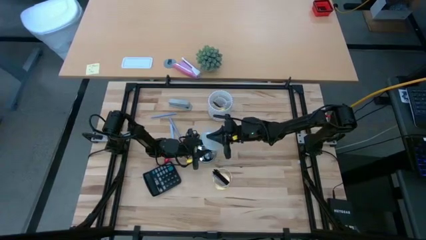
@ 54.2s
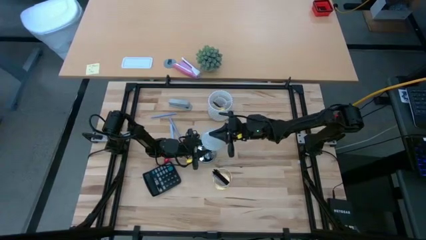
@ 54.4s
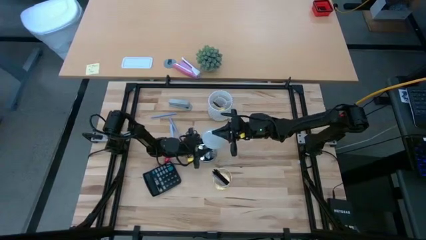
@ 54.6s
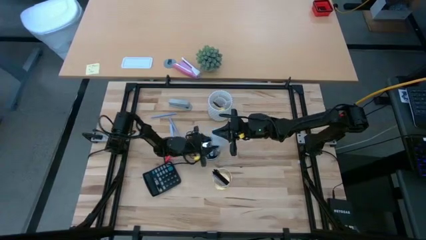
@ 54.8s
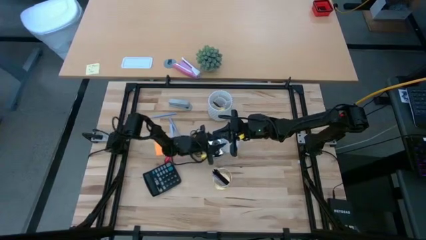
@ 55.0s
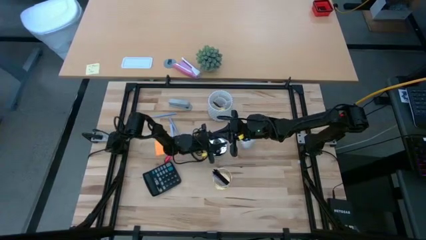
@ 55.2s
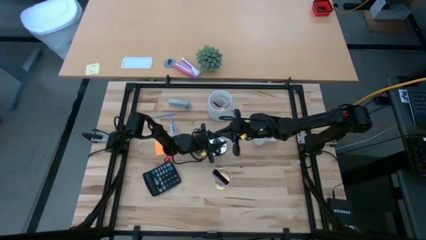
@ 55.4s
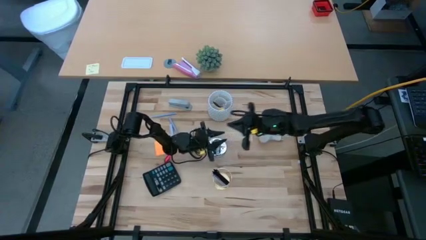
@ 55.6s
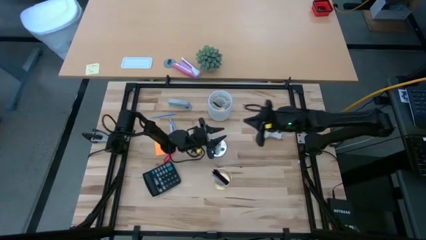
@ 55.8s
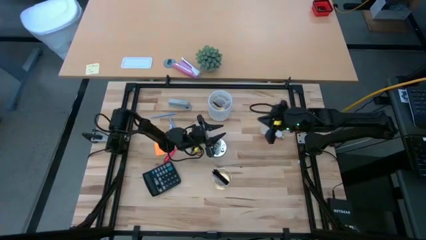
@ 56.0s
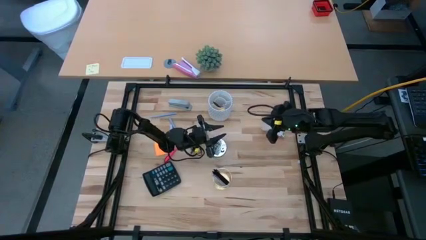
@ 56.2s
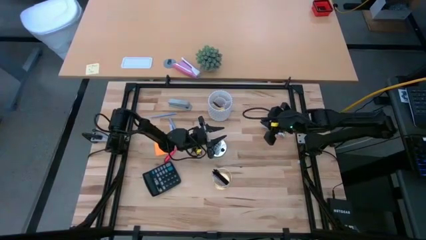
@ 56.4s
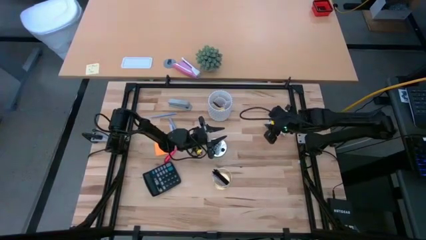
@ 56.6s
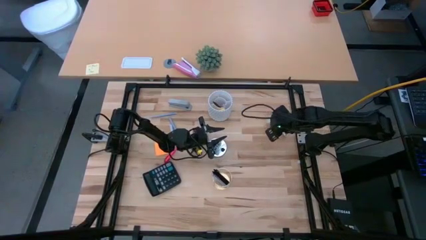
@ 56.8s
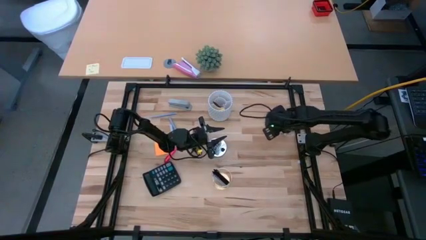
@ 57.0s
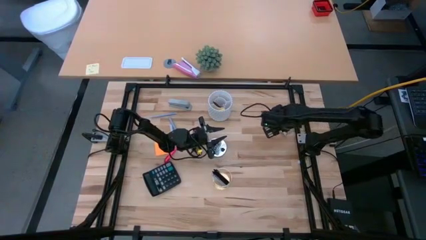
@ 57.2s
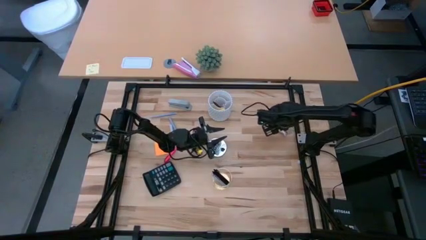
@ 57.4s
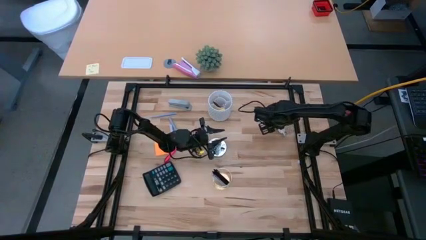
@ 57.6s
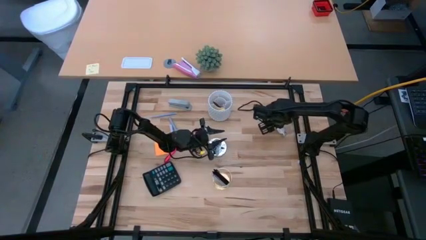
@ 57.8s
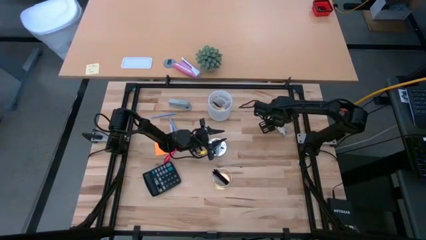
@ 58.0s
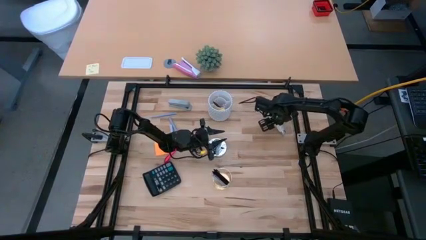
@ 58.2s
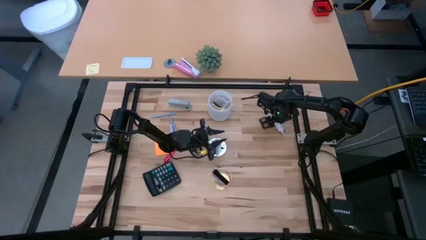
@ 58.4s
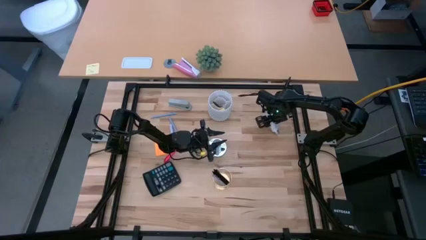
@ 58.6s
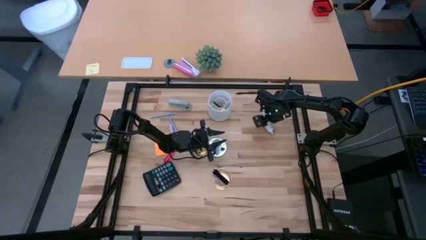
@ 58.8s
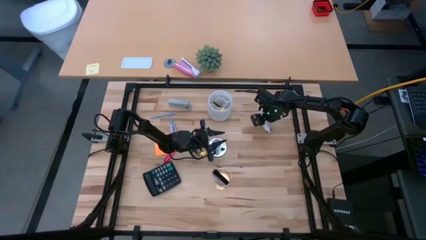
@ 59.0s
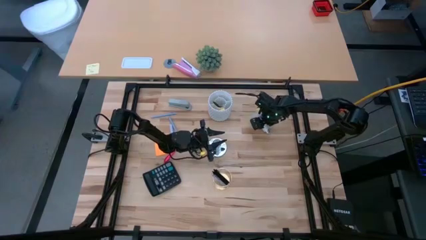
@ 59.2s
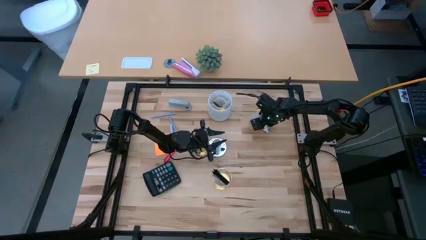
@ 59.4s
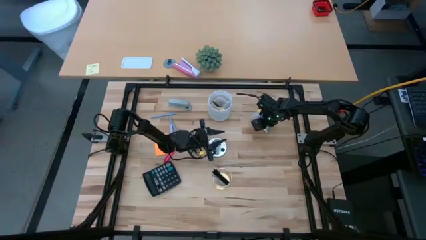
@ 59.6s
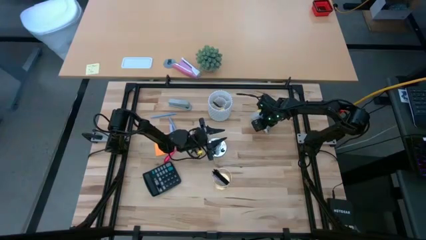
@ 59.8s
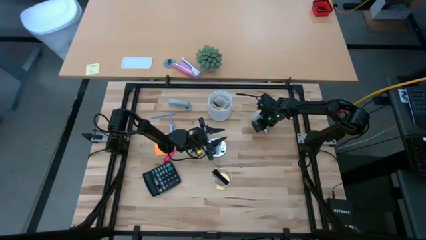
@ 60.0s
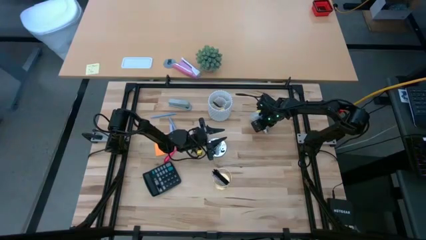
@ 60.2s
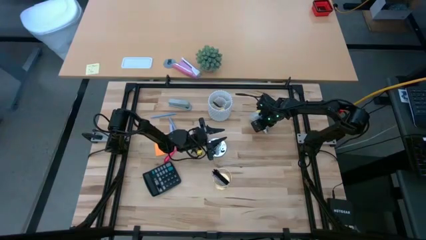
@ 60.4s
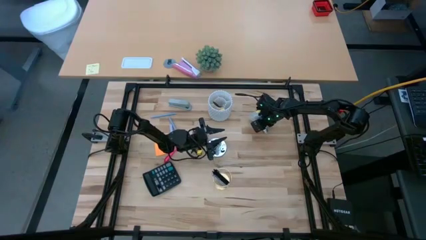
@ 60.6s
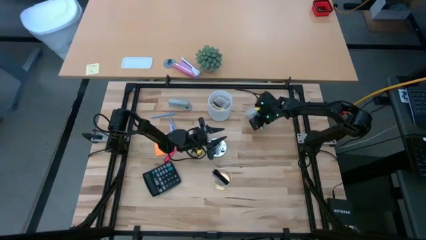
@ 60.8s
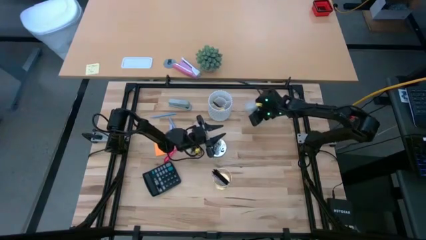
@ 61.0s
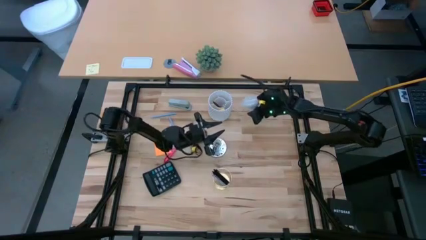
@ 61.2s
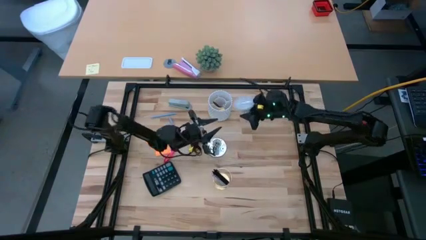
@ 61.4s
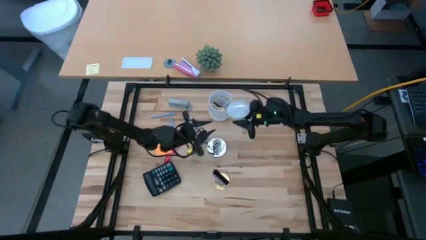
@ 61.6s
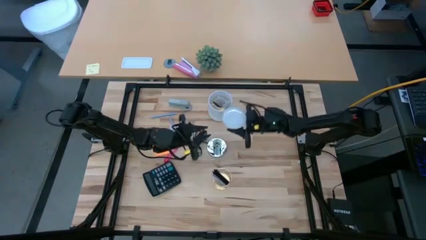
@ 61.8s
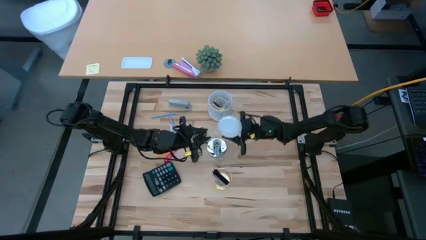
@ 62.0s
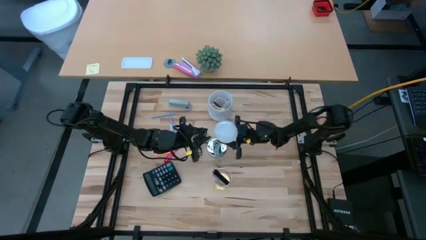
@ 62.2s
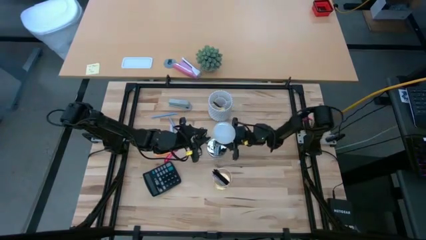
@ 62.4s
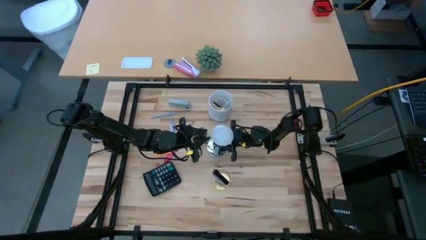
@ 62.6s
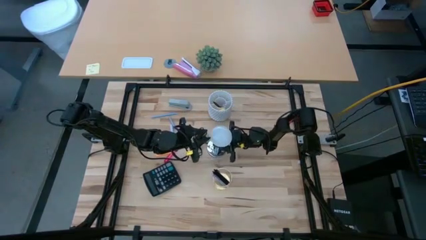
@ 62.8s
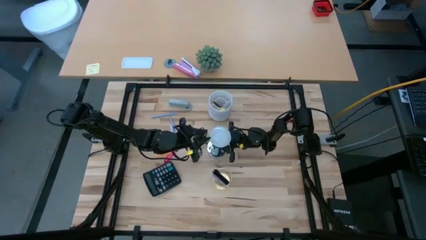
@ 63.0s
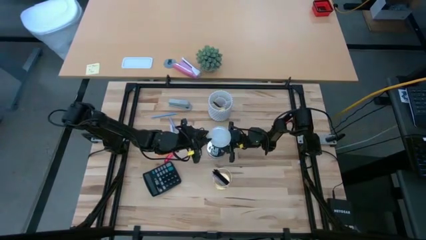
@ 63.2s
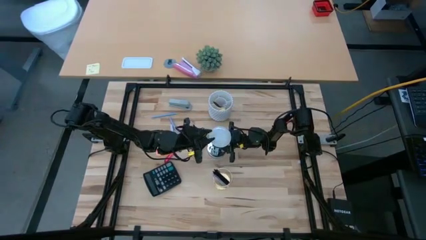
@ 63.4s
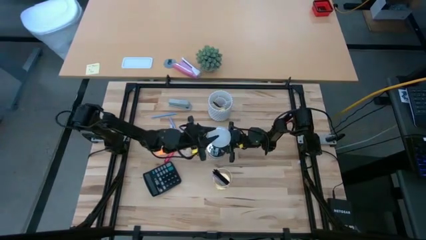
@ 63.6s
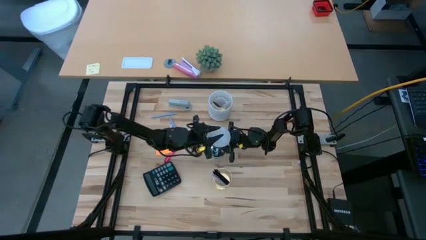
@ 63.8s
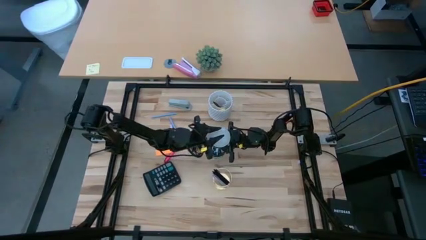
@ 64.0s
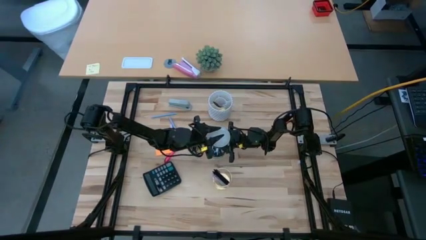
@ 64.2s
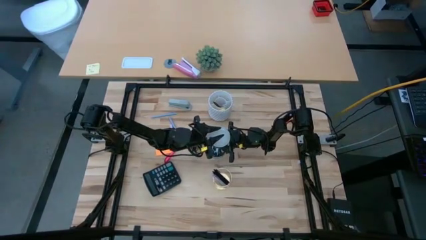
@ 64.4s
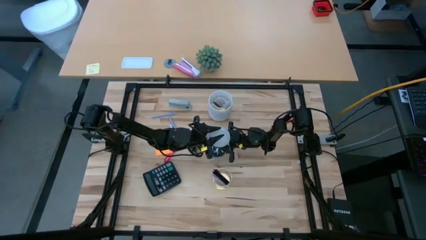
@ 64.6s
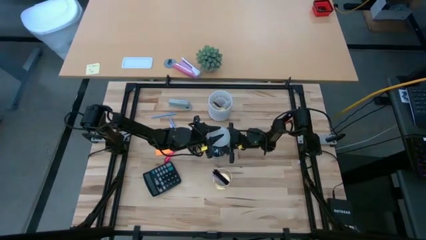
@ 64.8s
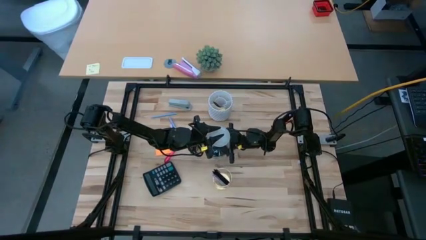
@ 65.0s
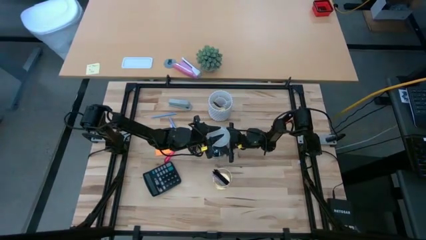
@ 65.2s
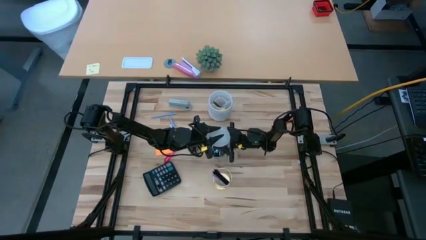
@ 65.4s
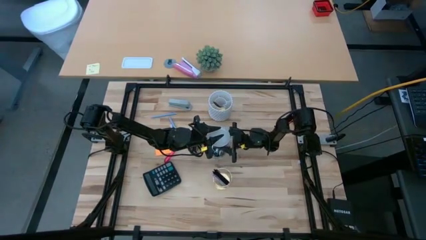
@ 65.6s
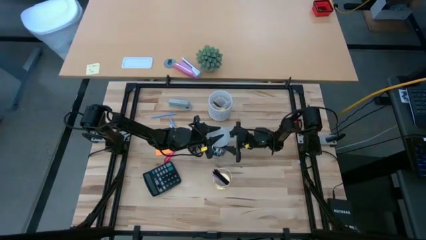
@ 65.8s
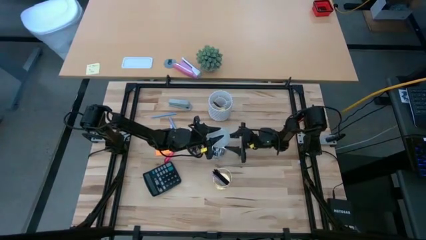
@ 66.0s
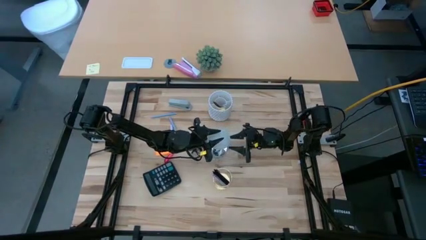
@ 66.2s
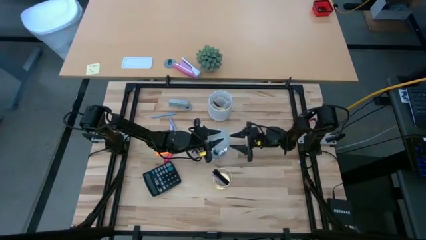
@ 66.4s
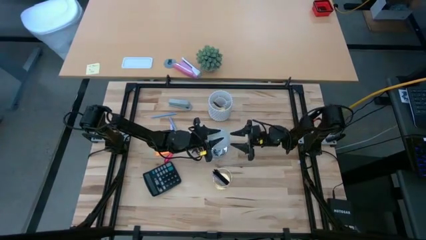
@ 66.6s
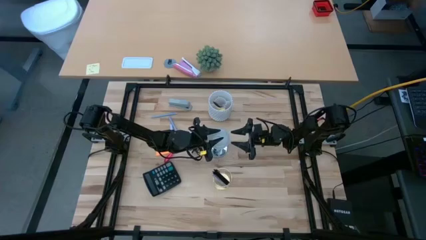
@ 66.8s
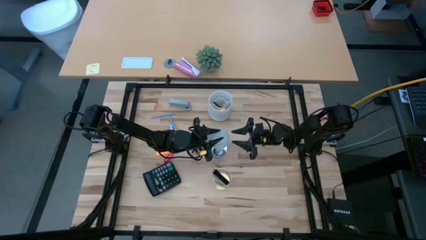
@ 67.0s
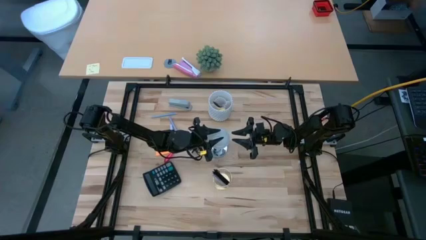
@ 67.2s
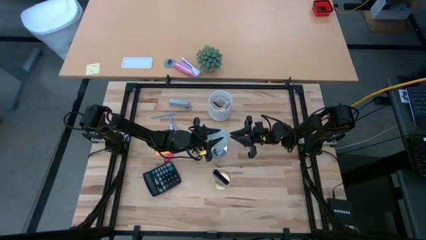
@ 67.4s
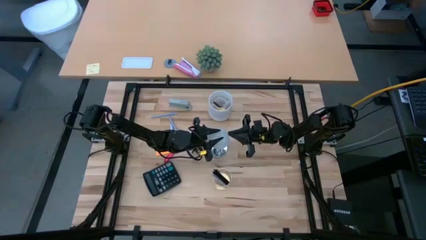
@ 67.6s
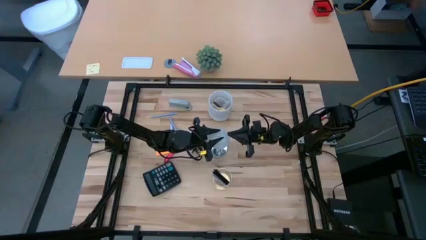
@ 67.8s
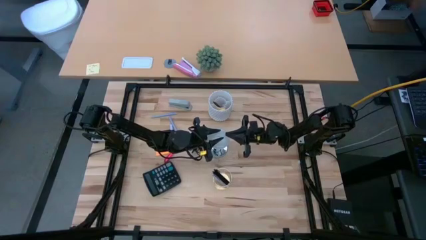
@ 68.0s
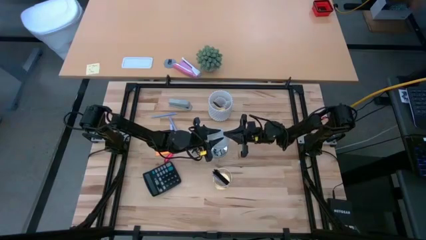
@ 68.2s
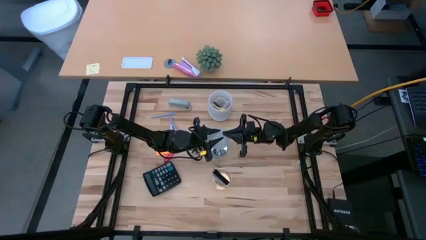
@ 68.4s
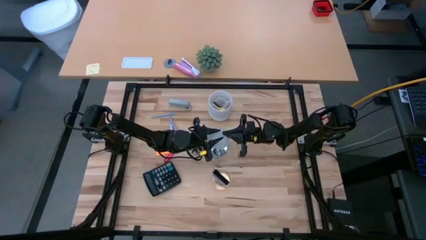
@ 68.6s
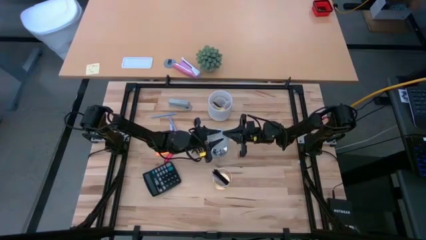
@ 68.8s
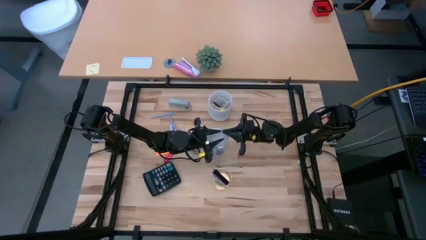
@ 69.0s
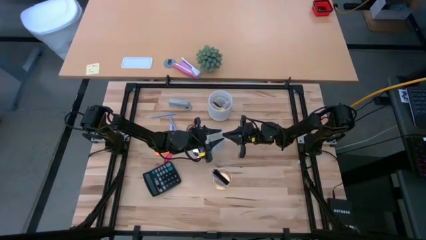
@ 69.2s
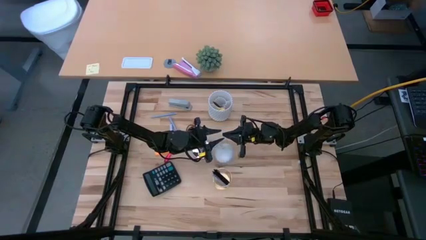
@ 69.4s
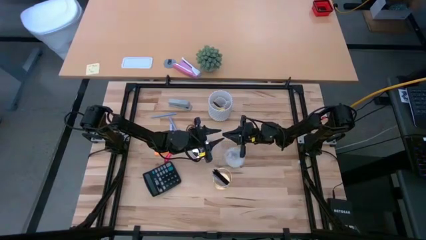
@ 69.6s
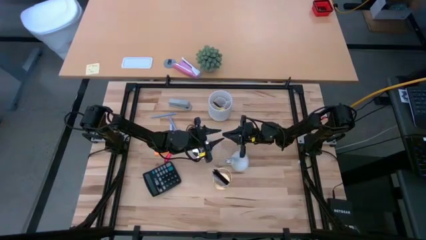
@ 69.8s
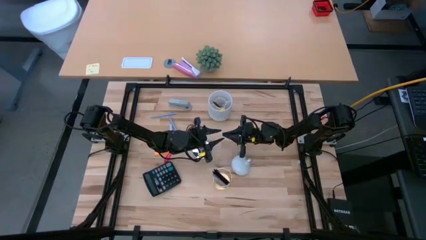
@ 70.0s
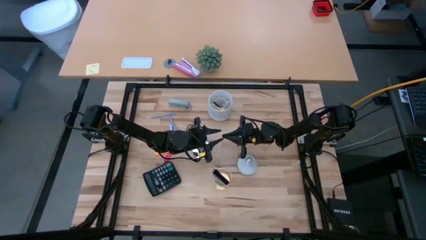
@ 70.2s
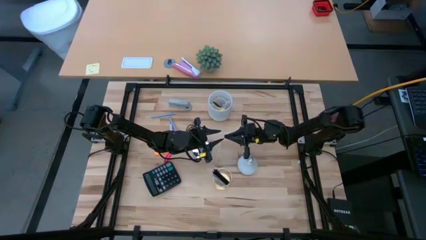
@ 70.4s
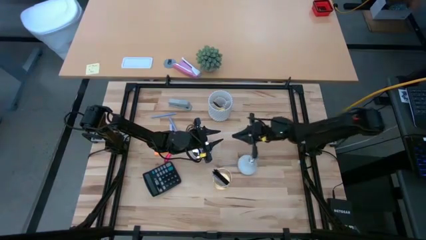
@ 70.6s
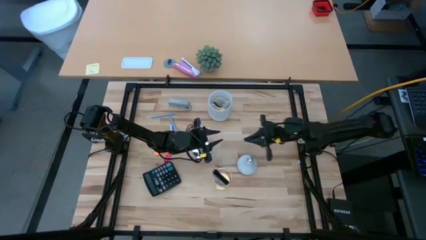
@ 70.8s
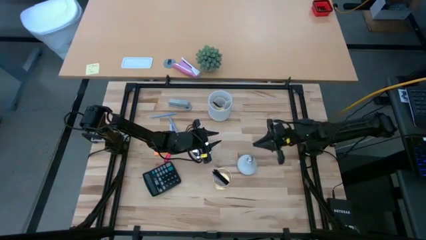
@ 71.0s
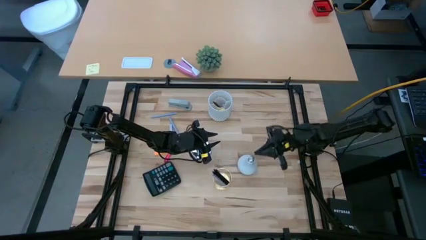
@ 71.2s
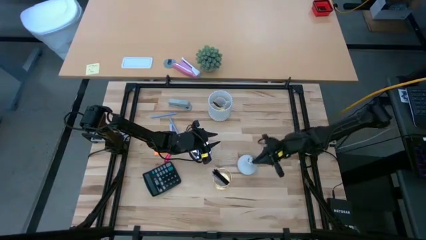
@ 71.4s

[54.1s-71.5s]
Task: Screw lightbulb
Insert the lightbulb into the lamp
